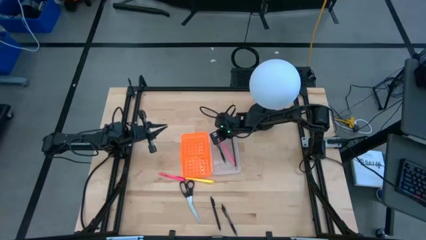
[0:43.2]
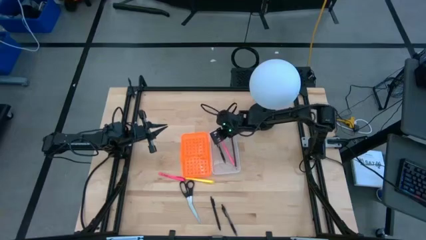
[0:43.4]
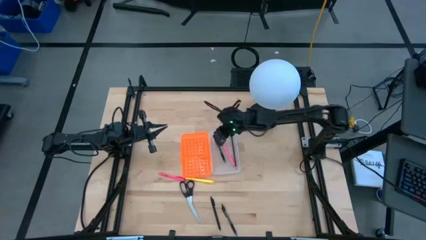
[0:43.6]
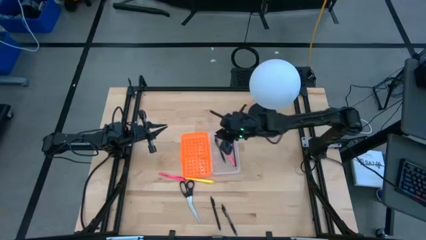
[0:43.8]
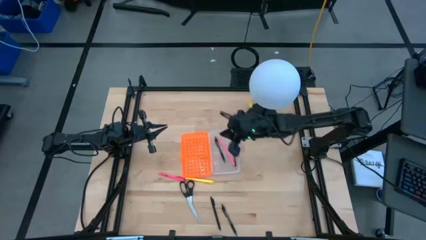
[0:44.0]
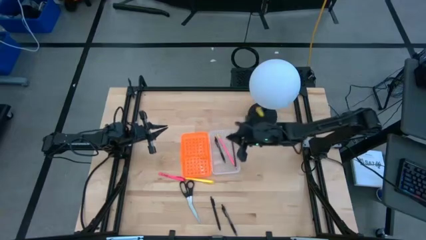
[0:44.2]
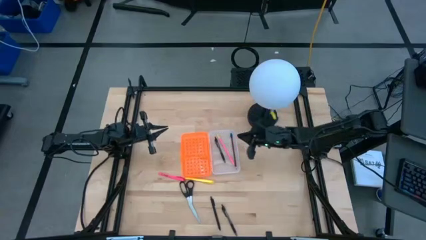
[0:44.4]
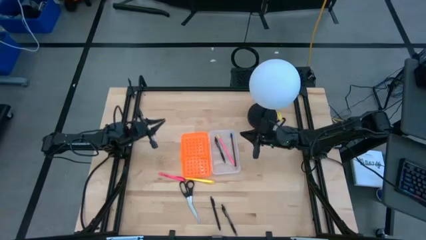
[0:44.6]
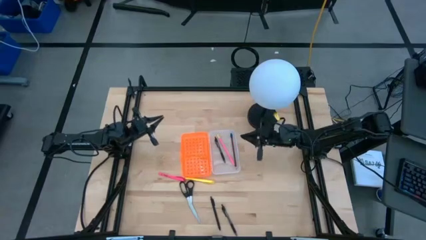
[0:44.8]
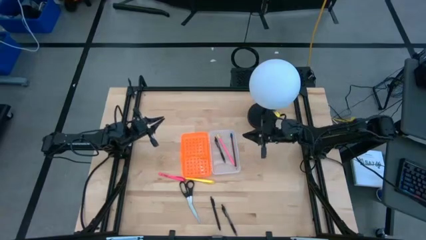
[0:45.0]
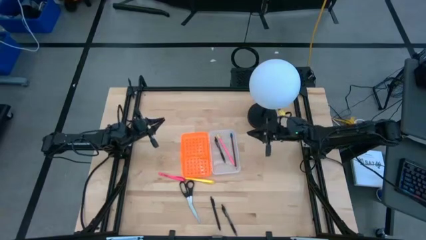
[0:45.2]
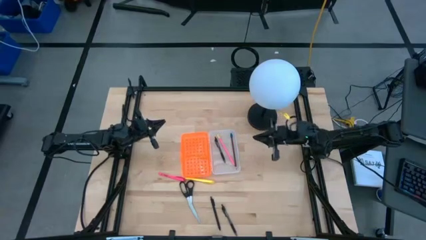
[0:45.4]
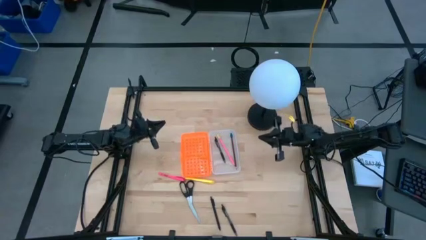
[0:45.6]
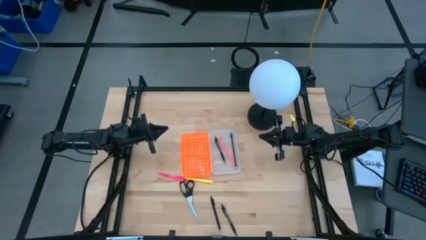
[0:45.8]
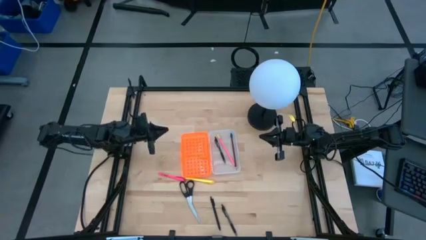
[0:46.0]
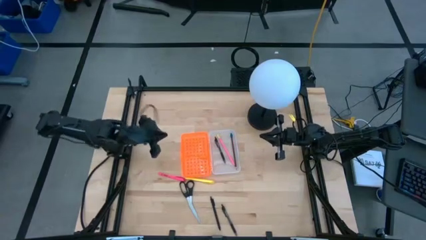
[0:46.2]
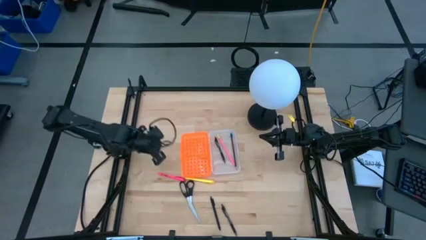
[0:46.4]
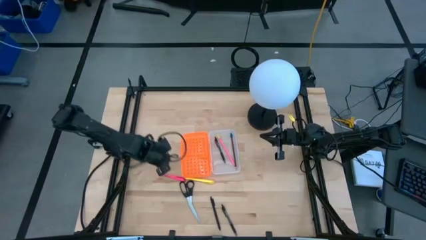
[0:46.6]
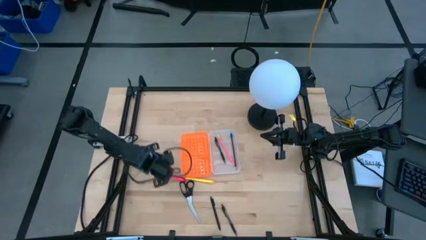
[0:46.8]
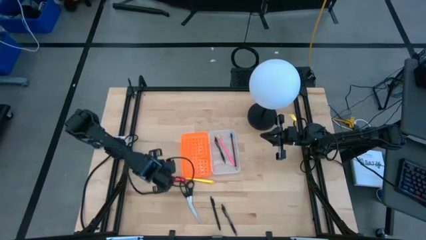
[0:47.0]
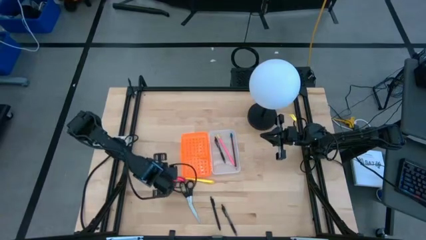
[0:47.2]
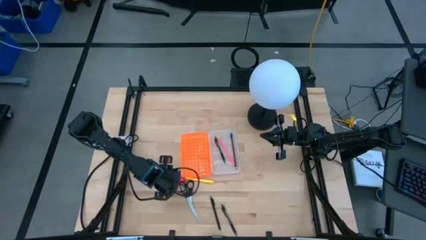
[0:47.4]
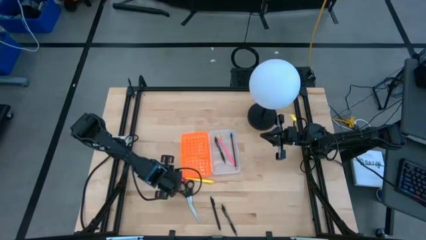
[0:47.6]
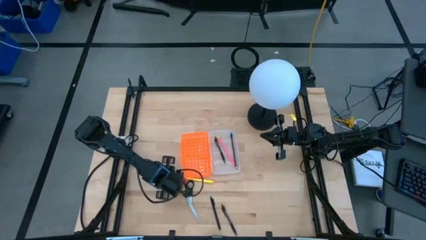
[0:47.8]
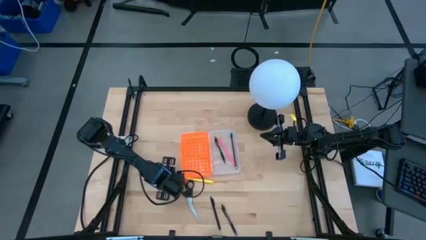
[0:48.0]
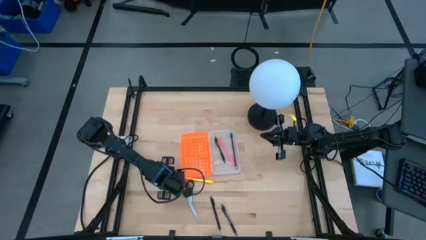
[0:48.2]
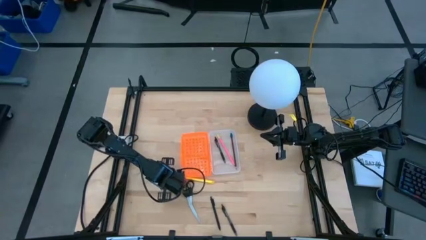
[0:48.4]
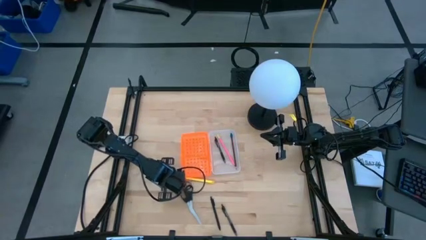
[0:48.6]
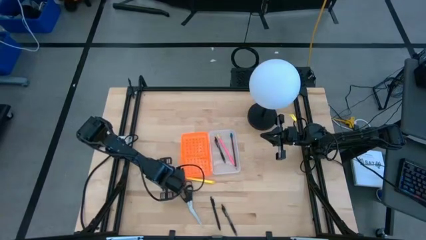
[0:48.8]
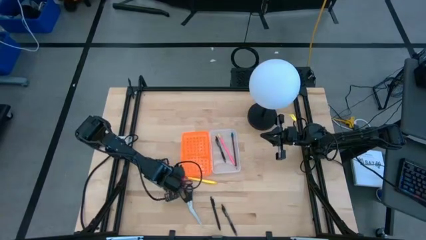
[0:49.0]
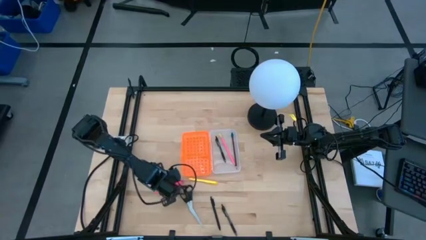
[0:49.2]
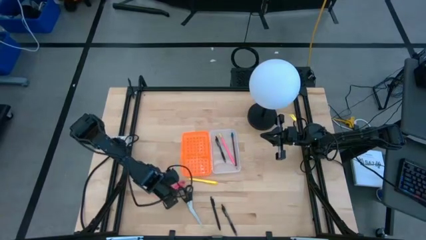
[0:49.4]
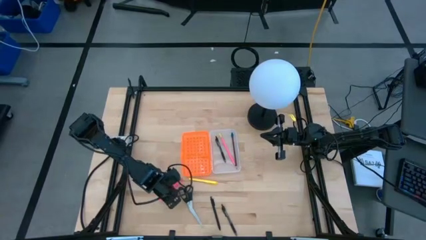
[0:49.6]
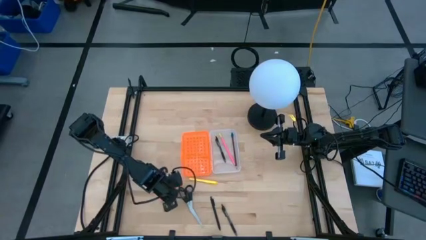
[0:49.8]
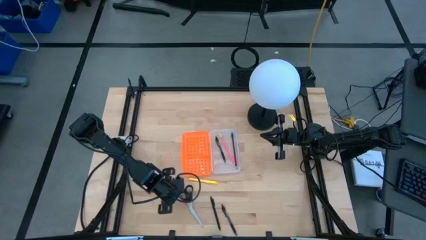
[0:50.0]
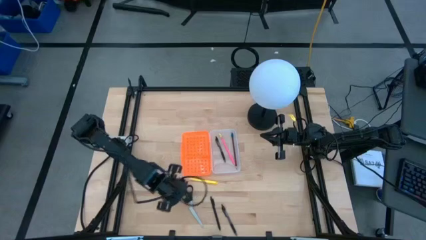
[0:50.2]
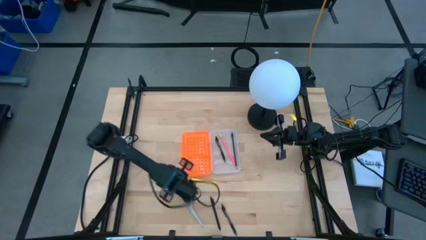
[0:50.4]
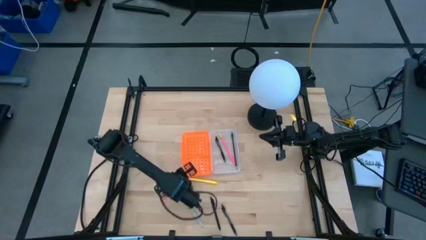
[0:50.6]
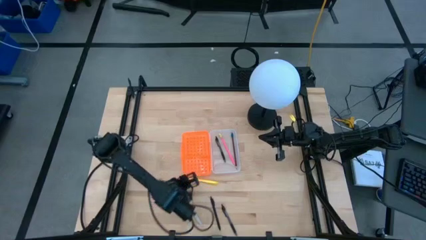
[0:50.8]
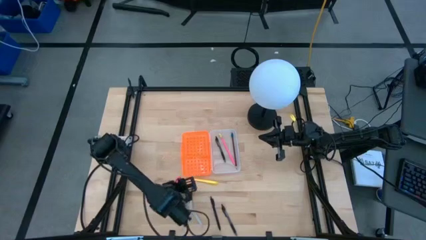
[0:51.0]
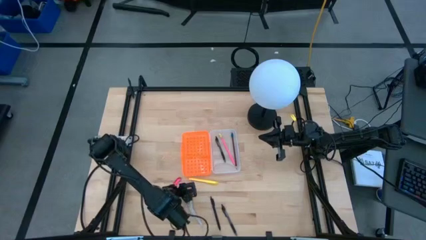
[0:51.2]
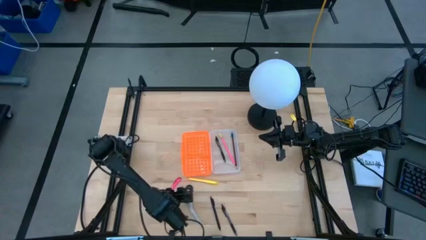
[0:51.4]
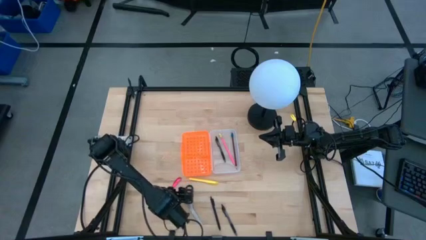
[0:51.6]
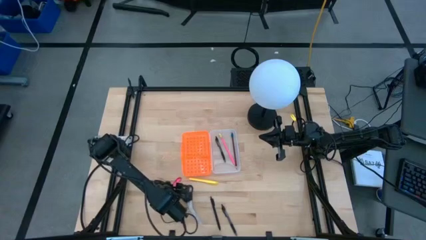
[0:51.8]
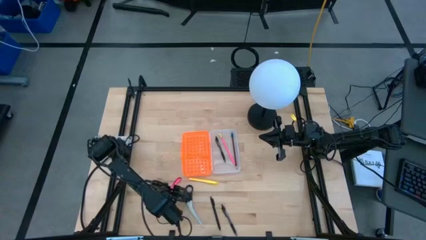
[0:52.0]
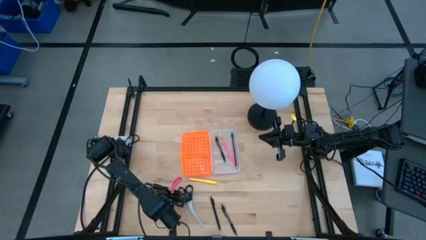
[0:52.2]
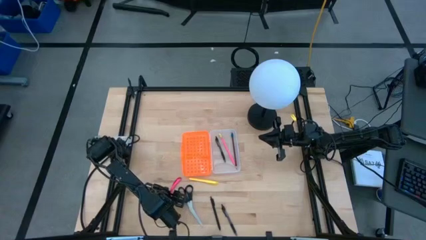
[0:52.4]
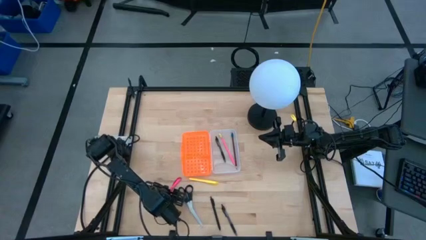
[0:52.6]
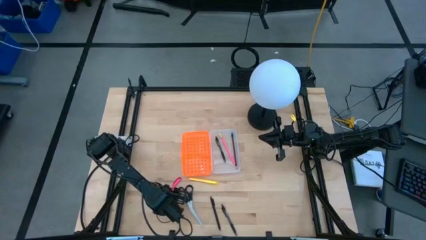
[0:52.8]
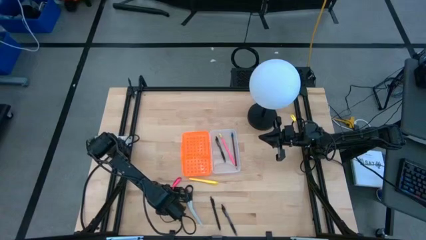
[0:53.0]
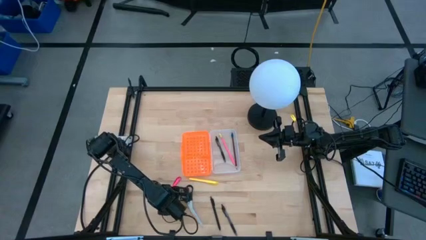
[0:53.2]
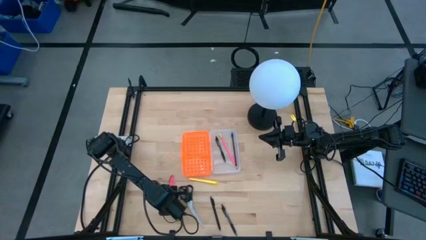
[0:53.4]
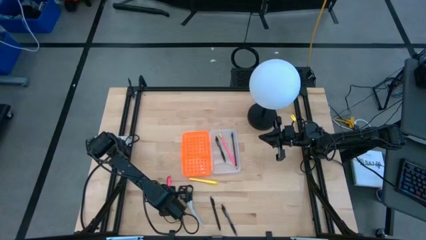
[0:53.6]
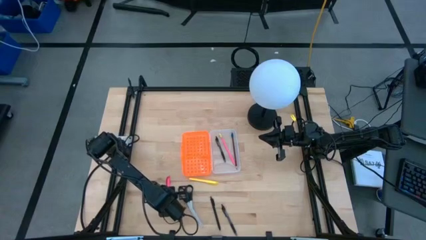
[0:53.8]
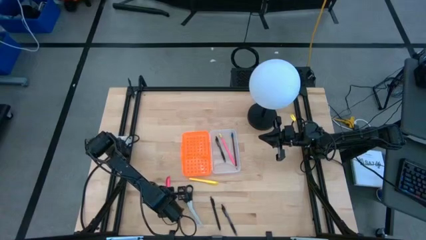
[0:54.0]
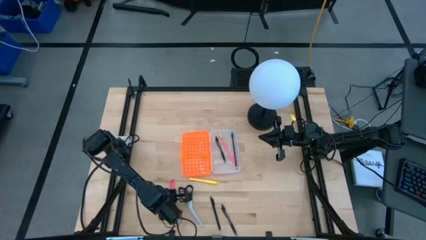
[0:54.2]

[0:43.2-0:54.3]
Task: Pick & place school supplies into a supply box
Put the pink pen into the supply box

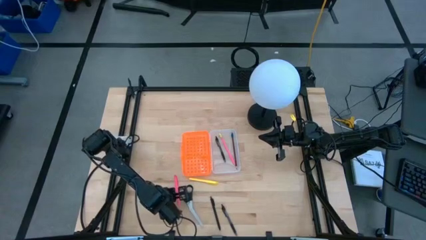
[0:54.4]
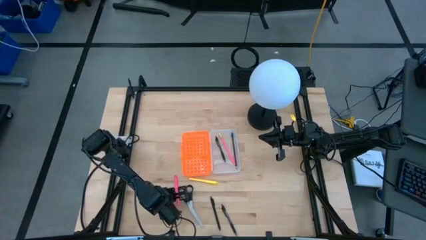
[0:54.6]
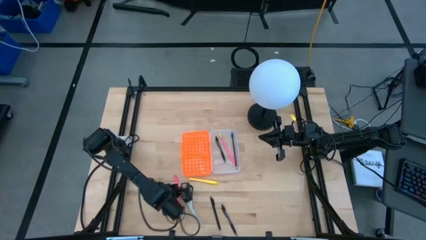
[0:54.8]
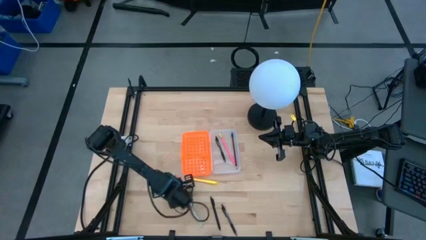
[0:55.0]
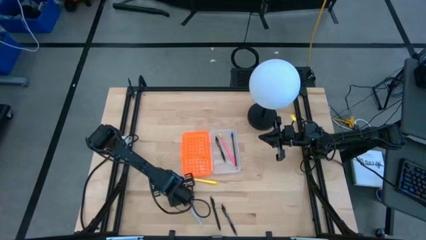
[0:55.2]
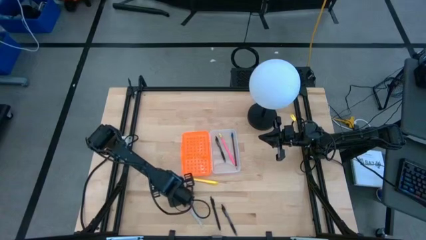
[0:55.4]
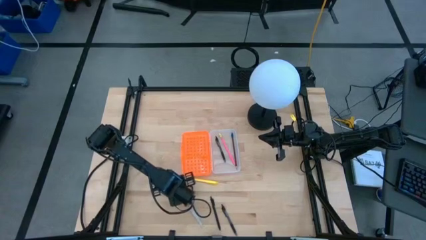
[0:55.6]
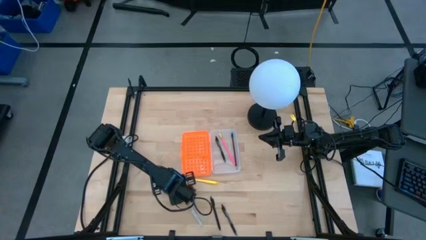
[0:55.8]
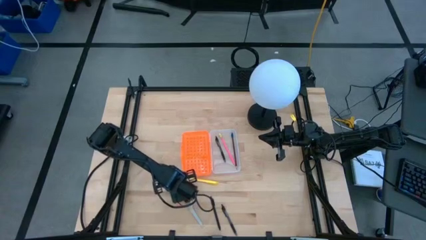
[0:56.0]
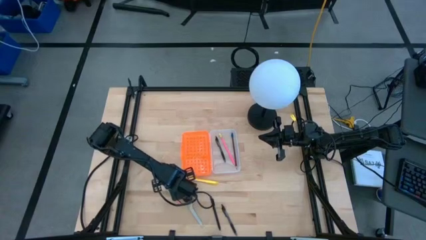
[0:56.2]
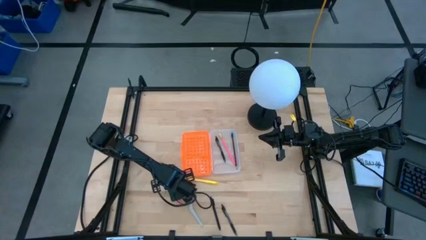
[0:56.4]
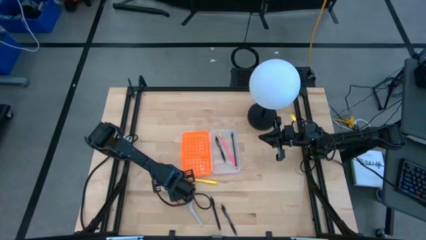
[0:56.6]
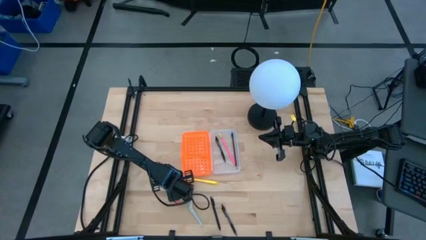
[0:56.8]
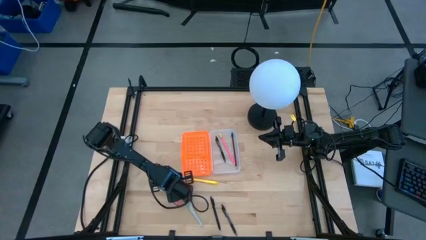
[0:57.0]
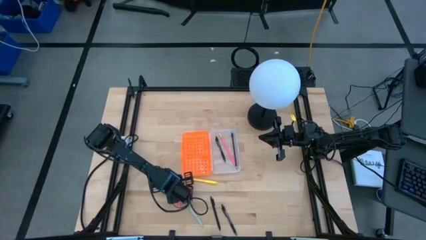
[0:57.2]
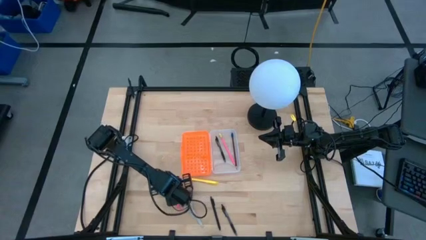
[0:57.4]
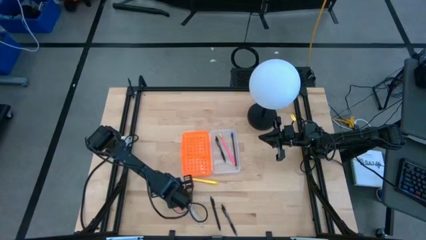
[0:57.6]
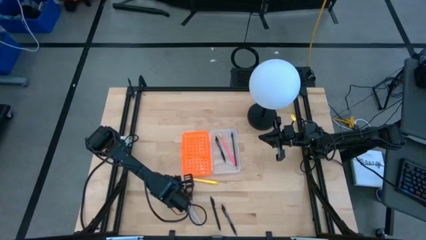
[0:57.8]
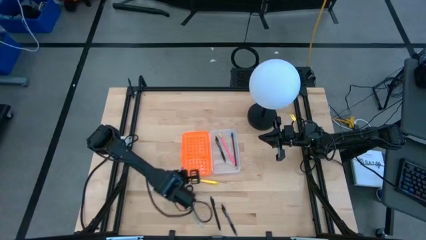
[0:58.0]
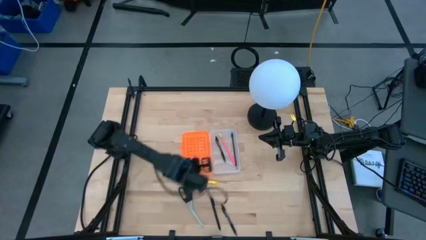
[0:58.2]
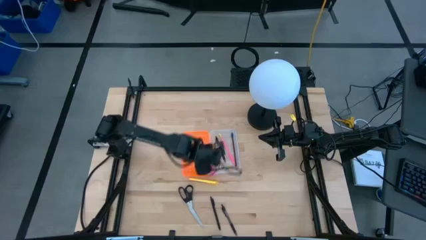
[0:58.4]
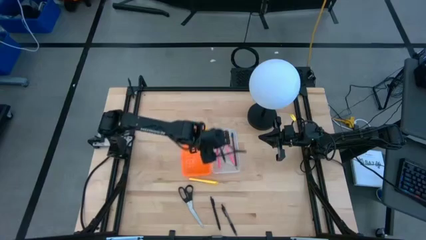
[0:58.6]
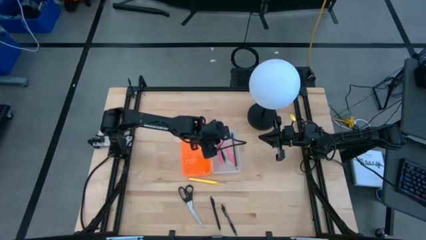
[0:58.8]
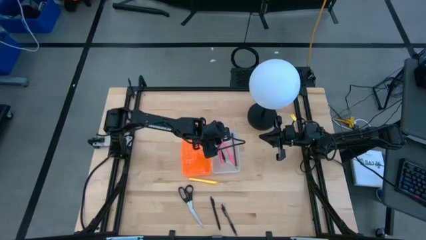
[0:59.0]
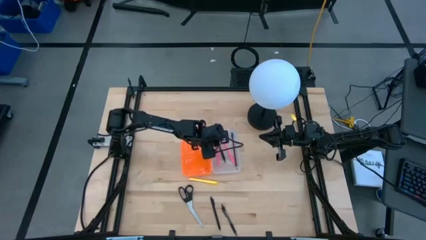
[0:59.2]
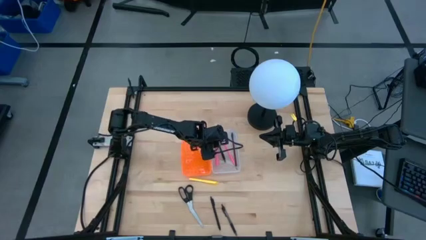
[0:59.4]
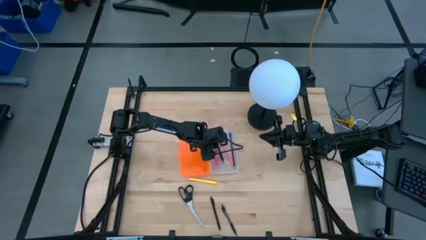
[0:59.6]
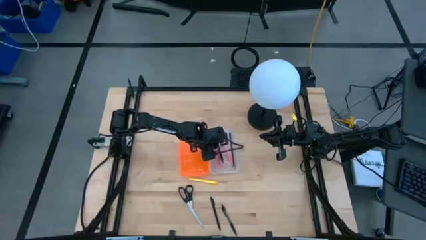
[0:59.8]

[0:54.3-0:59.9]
Put the pink pen into the supply box
